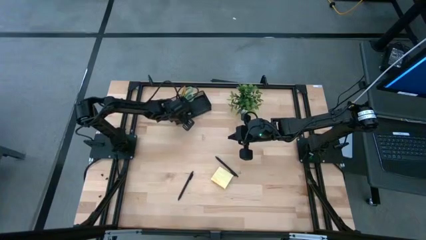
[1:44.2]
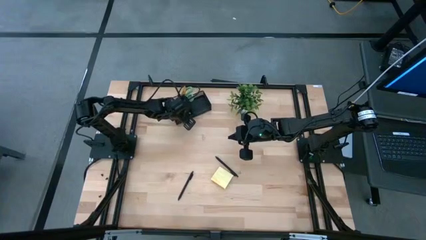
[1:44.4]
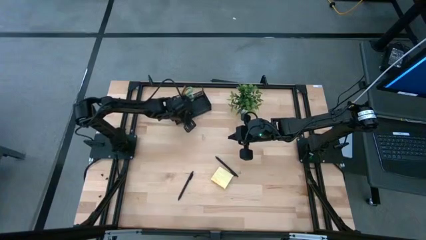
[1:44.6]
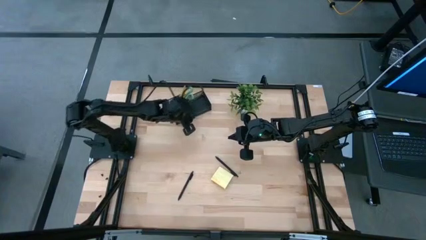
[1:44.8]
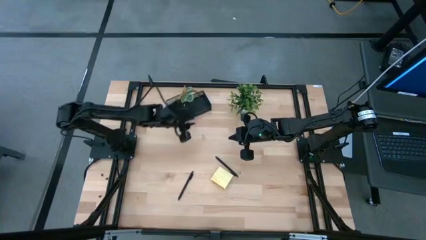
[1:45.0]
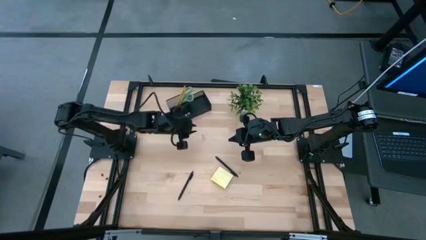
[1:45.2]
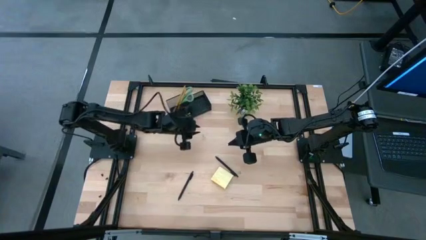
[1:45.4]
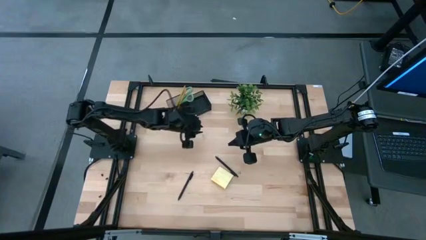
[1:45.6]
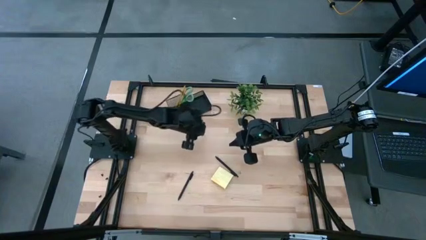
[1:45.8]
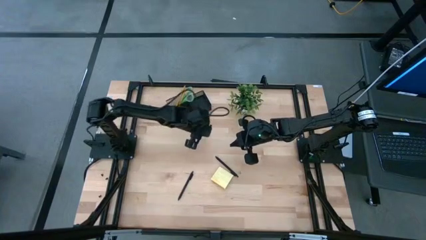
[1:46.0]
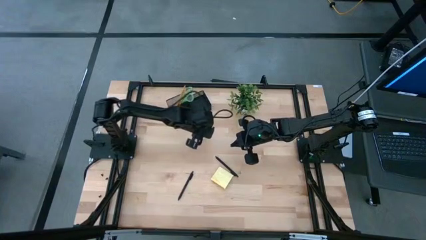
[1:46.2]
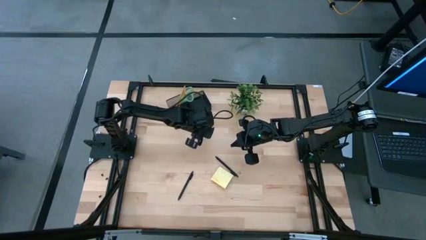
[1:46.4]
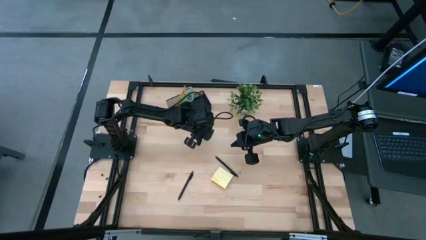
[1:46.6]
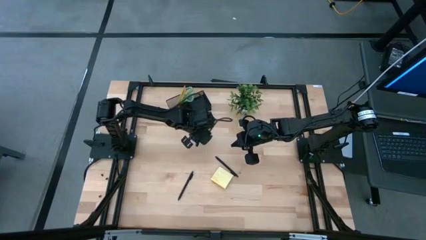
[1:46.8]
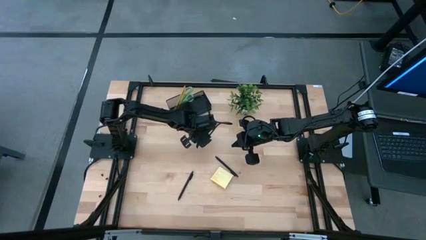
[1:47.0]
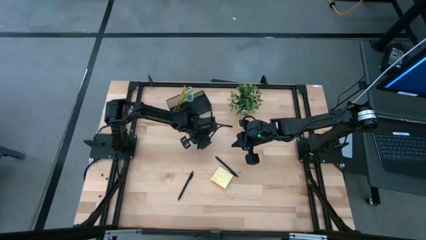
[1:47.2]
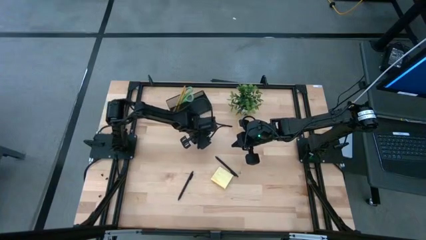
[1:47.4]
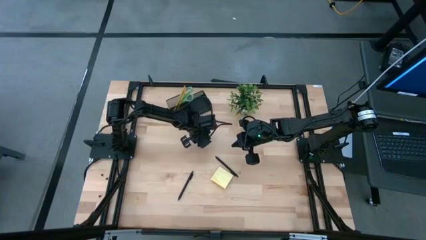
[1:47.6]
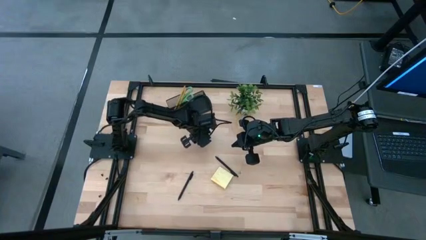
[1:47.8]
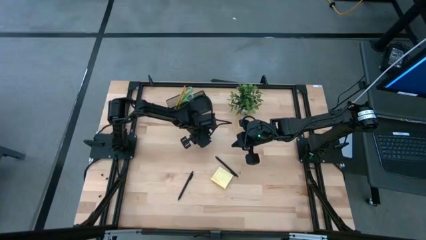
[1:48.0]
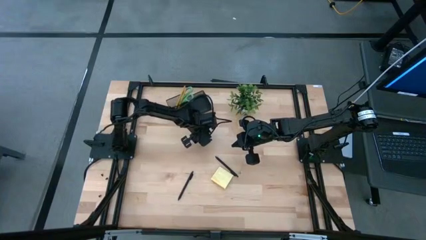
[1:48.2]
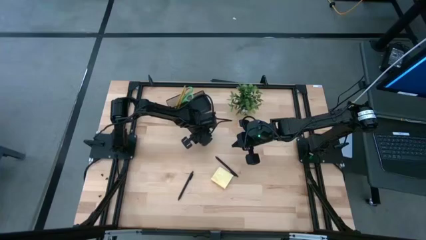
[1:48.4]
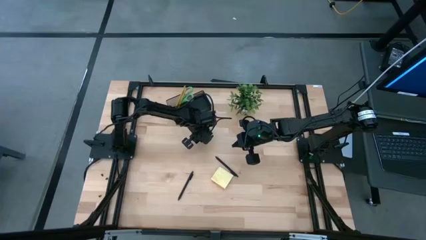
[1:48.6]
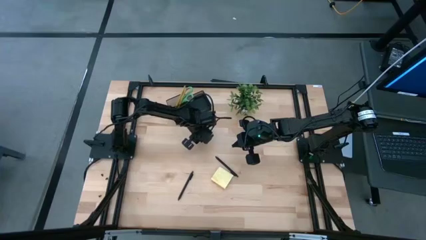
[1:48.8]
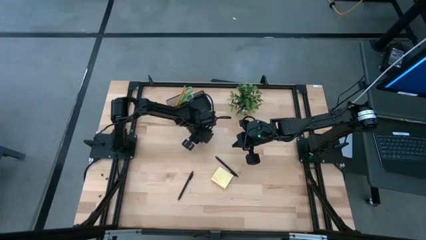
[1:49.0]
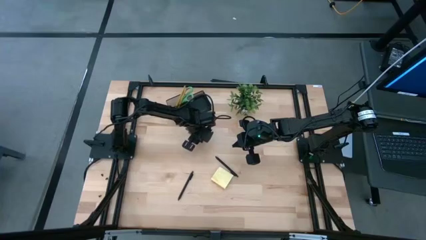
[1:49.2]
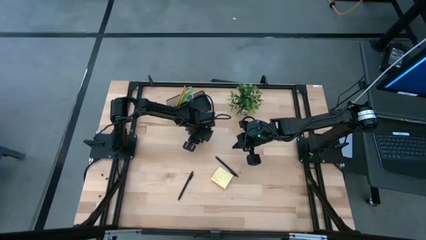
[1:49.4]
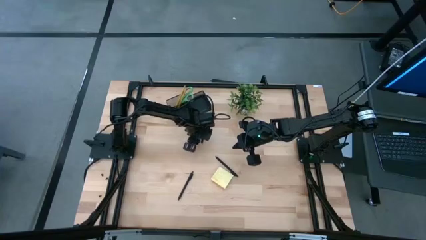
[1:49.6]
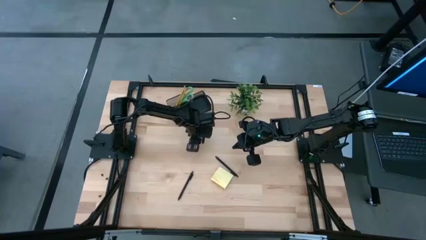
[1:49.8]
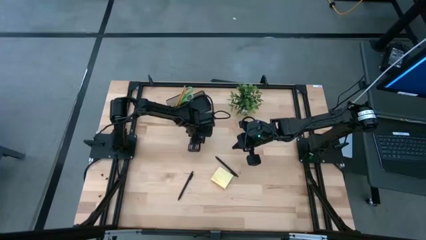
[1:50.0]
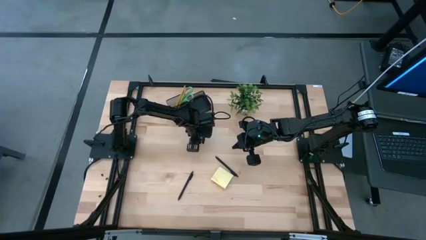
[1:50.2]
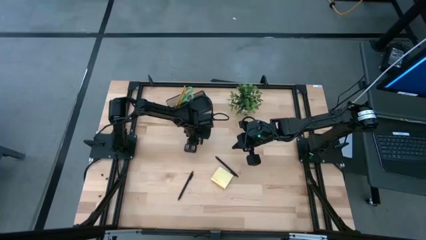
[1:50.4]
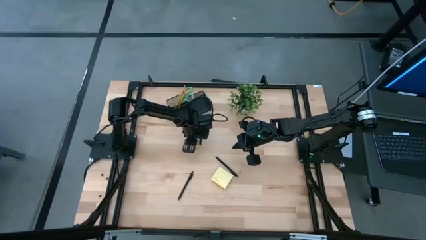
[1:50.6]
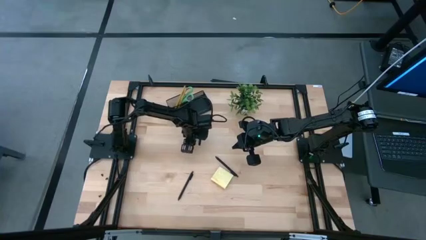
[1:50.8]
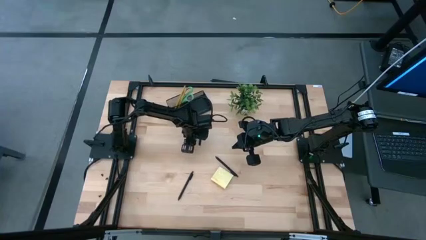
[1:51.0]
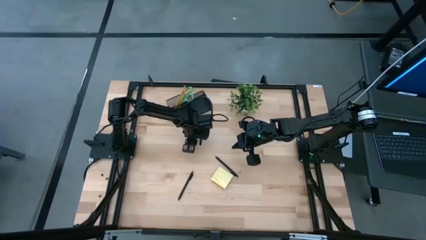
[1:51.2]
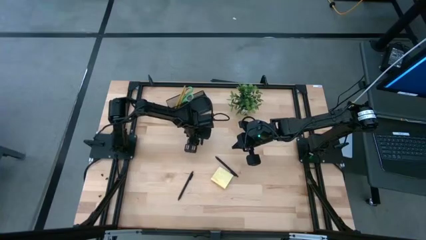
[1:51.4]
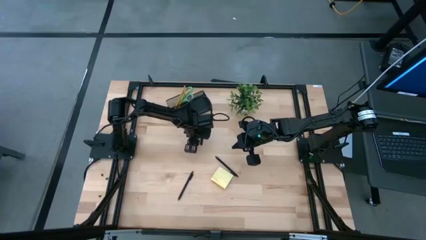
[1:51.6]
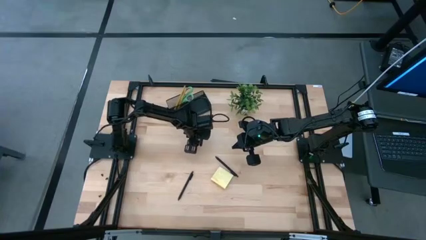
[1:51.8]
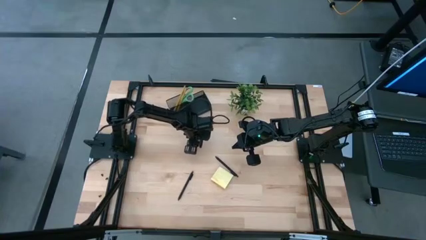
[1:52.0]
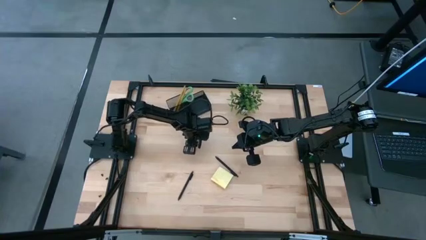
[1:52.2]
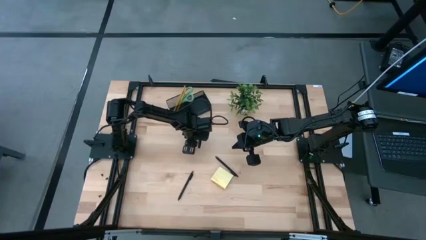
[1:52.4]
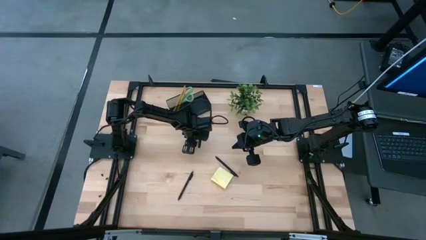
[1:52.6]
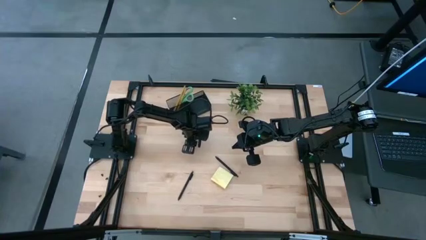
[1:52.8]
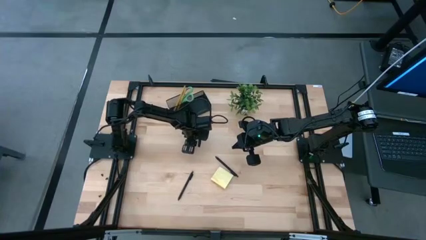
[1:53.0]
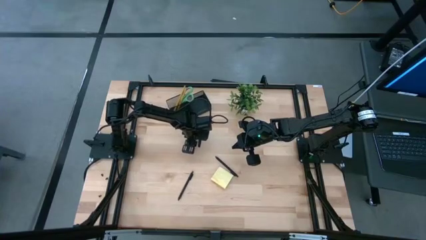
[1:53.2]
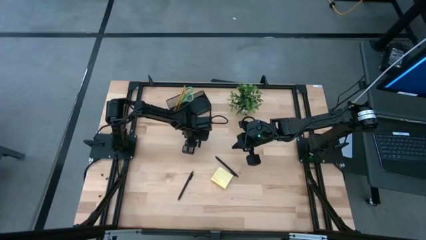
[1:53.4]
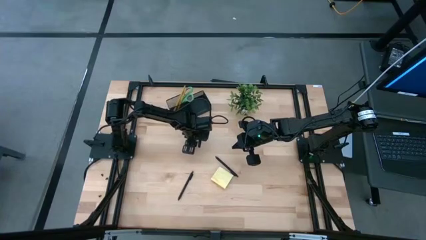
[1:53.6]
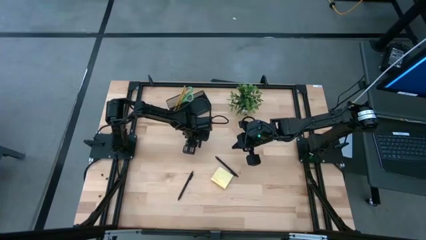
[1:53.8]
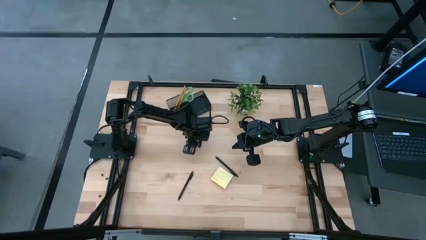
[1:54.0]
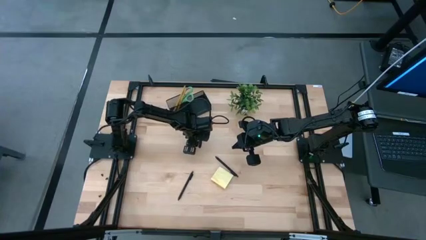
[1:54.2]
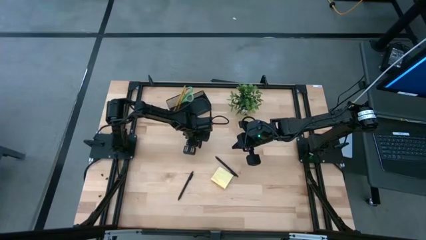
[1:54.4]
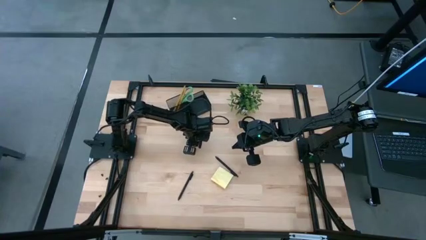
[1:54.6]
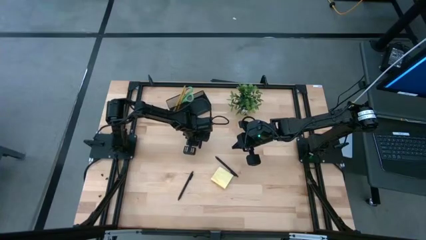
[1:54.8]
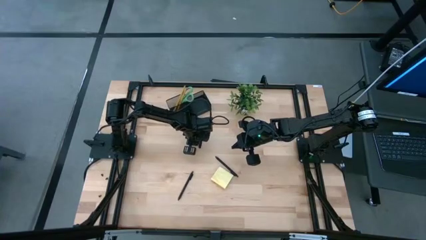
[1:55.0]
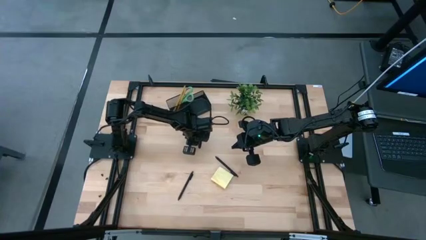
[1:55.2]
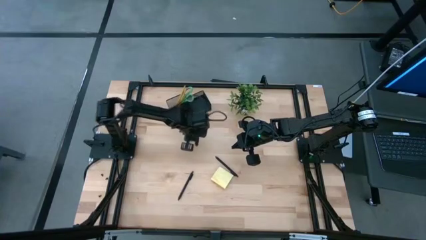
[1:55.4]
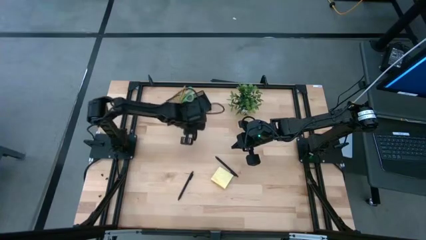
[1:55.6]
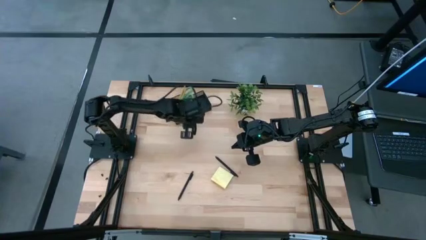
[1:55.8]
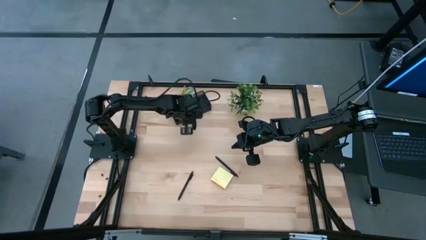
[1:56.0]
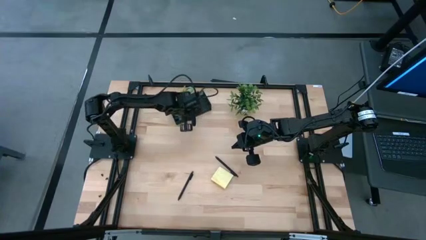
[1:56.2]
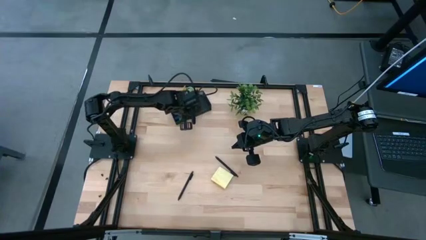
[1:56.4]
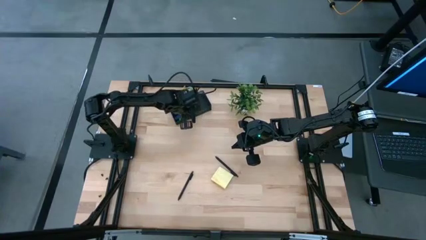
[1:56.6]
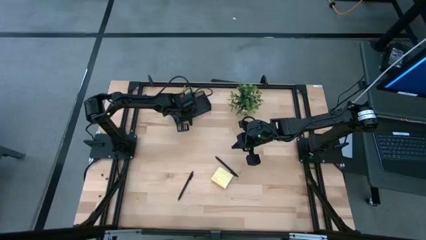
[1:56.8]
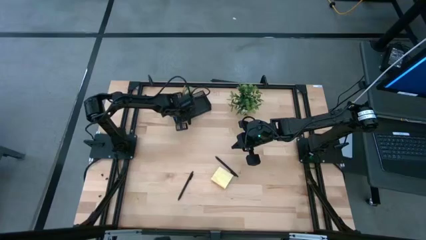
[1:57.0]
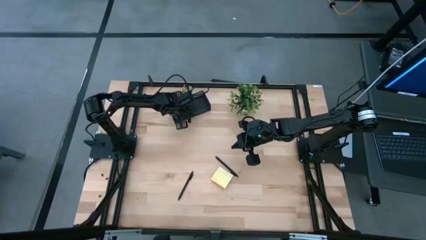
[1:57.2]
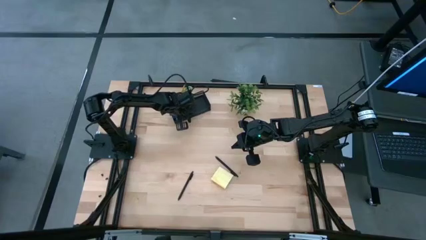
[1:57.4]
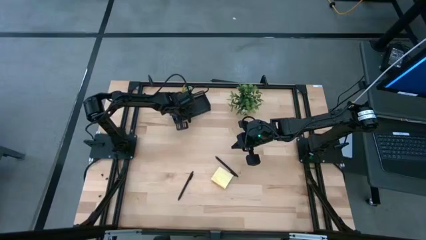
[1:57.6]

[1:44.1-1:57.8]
Task: Pick and place office supplies into organizer
Put the binder clip into the desk organizer
